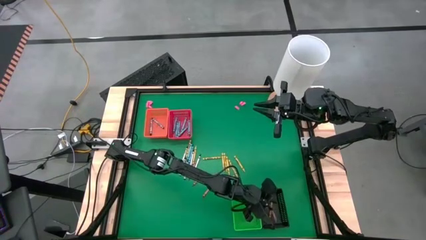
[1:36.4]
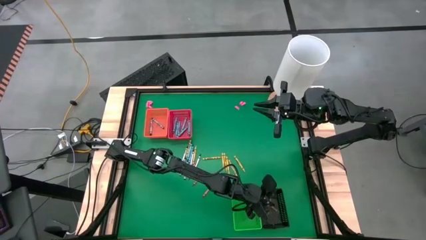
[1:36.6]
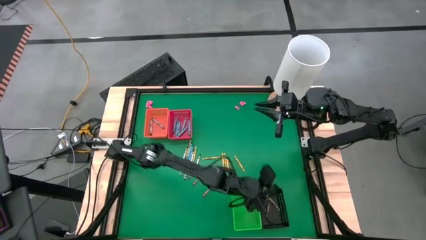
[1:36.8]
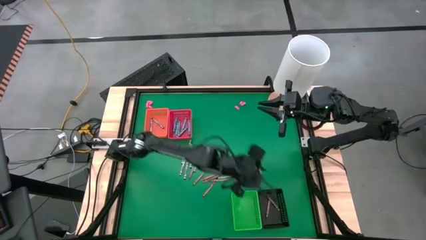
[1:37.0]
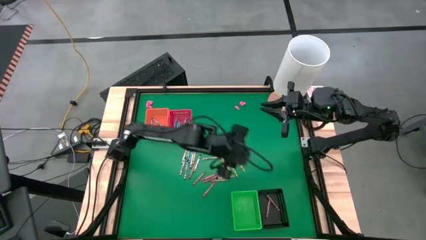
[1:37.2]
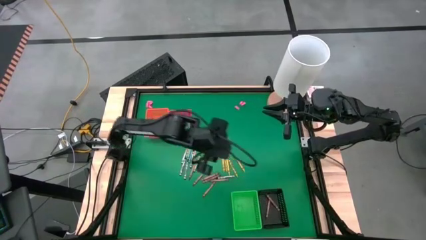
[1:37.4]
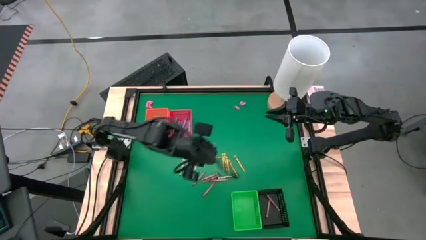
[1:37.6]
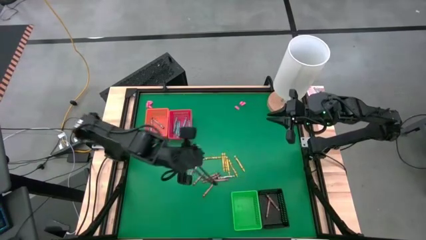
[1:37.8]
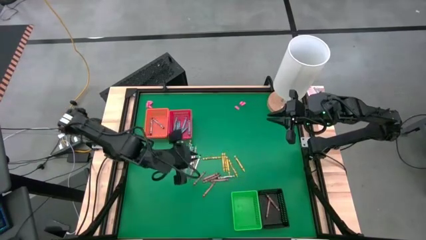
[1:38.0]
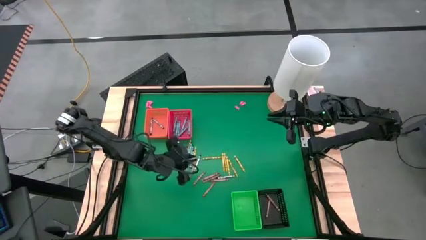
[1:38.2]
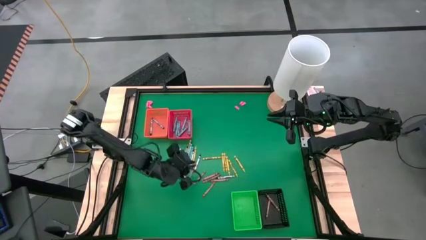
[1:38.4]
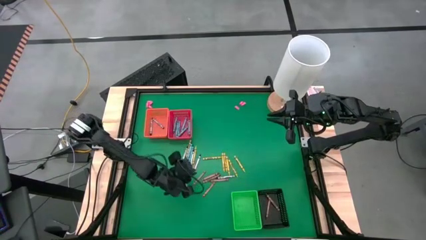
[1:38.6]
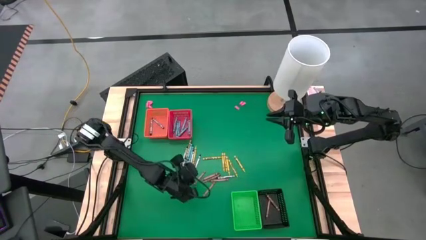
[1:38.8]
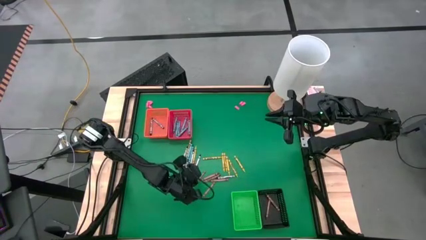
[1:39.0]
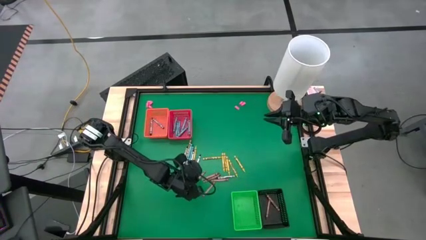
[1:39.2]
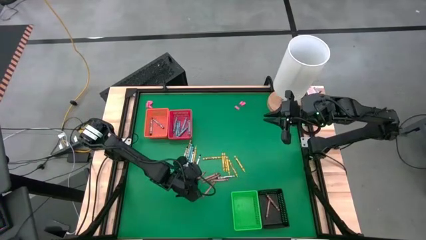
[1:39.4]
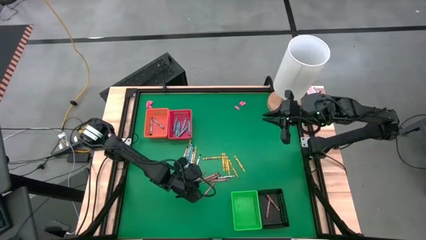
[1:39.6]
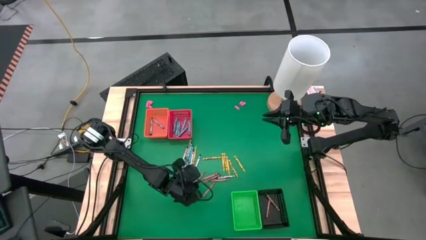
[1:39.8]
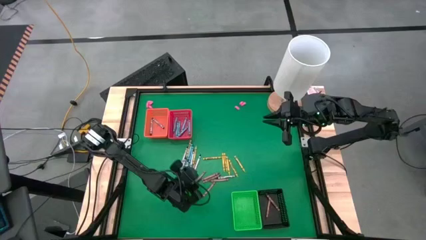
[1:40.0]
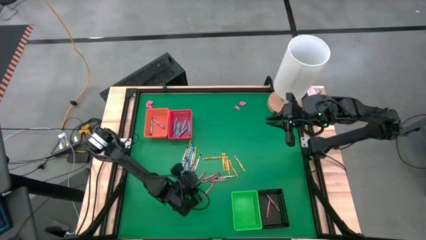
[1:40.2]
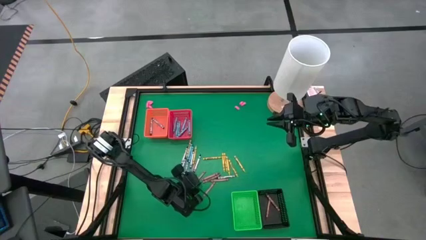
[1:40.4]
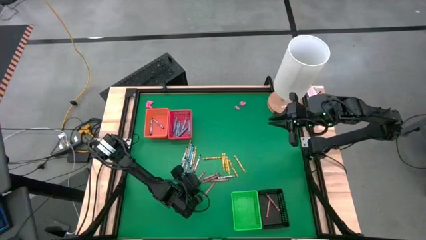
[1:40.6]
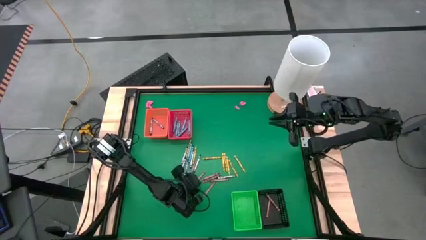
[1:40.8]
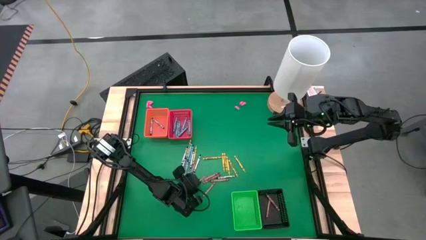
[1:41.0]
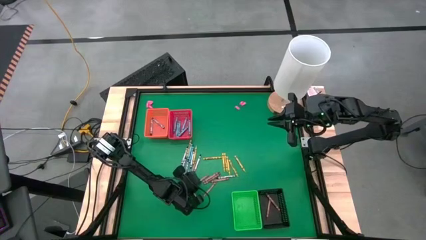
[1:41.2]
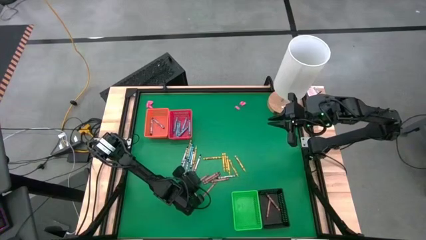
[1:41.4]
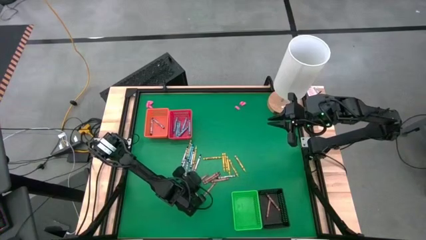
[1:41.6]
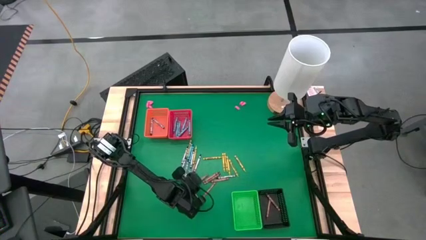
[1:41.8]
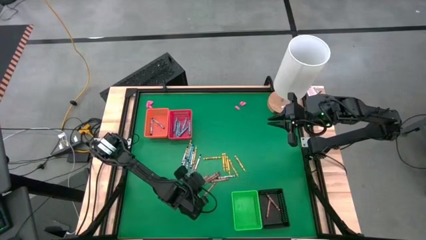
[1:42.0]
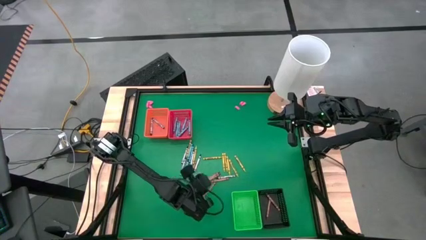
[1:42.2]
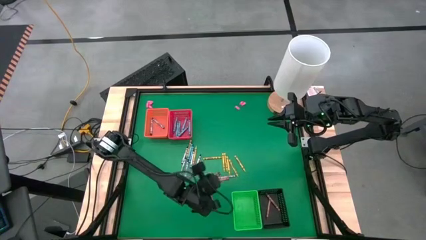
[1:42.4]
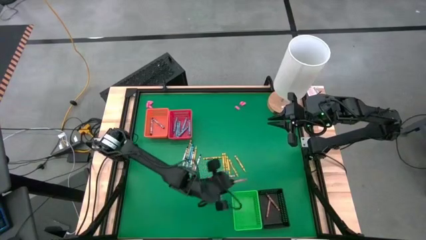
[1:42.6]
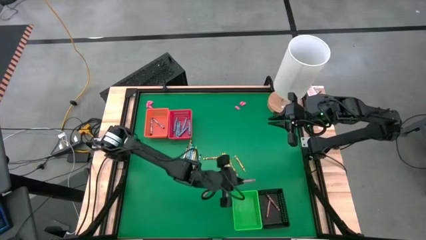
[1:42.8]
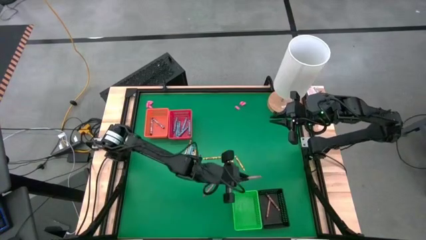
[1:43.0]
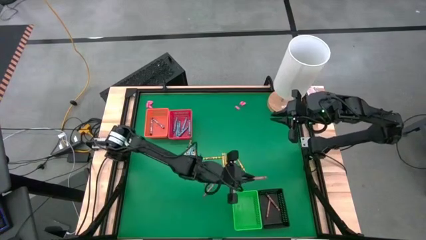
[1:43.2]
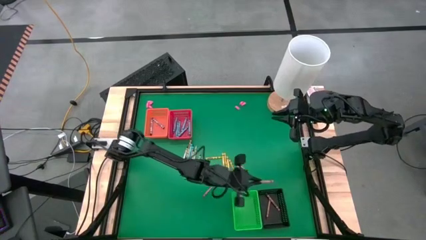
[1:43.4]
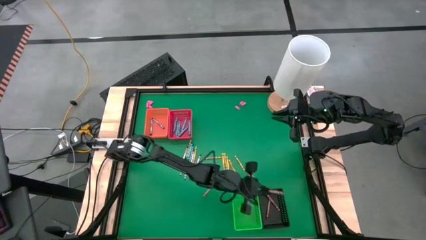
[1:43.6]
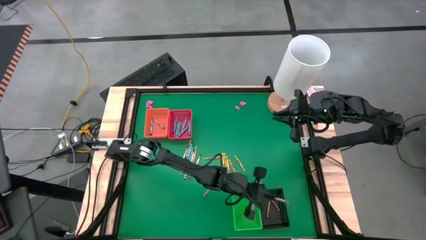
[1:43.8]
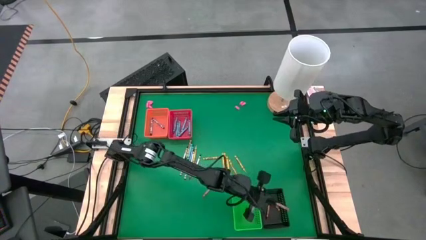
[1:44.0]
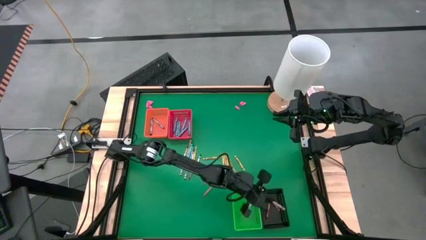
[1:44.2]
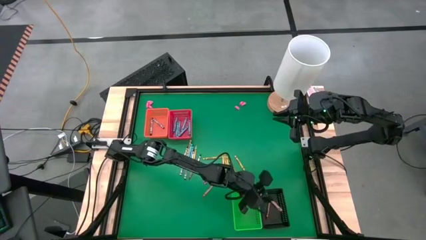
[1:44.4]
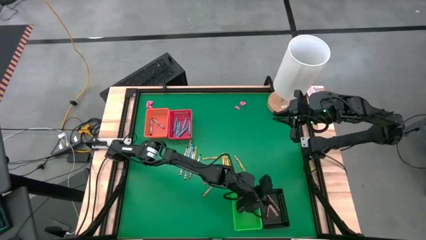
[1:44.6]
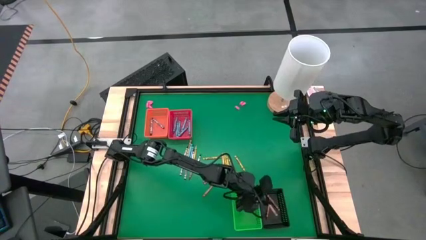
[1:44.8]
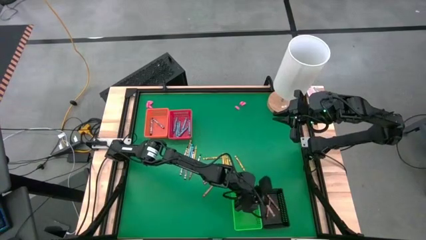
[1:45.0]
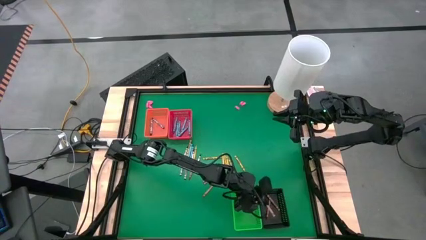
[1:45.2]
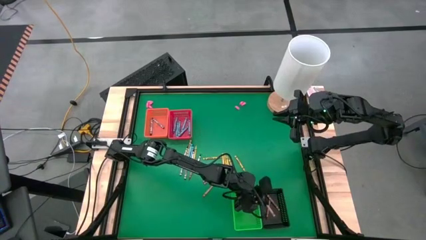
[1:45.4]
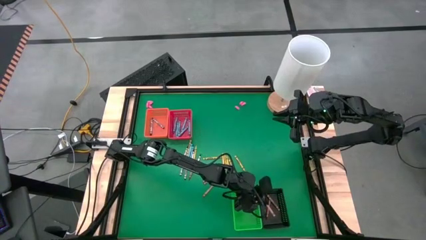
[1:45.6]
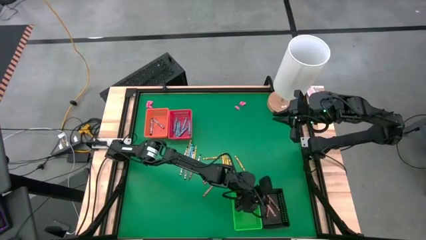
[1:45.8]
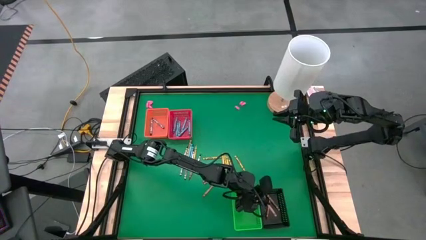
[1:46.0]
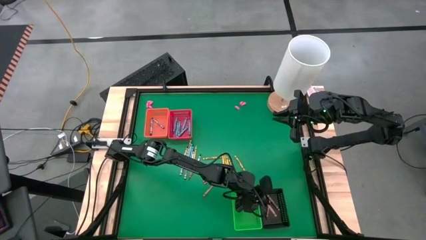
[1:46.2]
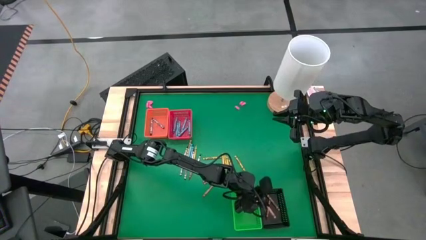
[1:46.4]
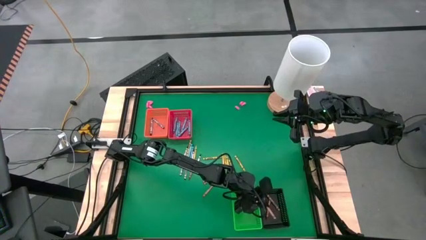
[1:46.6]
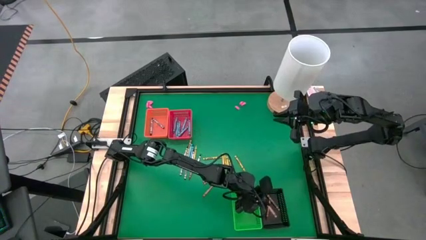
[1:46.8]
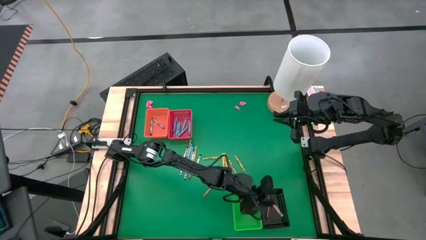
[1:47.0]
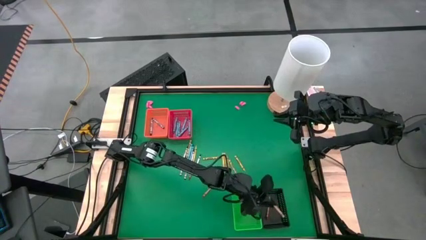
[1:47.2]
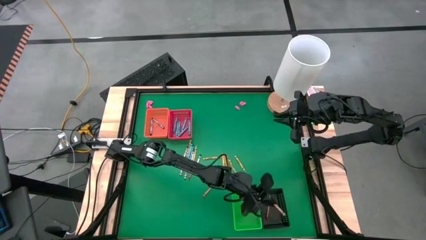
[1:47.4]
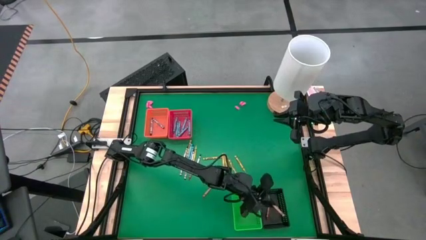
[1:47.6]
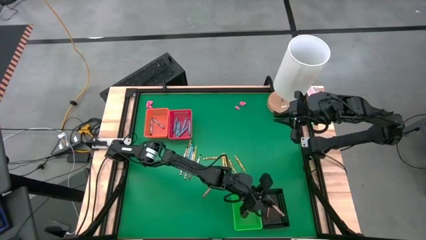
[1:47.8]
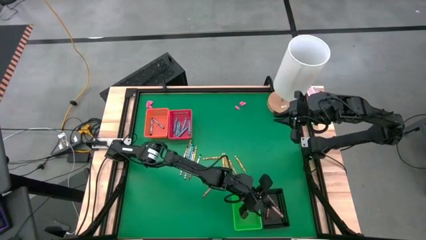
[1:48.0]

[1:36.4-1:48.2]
Task: Sort crayons
Put the brown crayon into the black bin

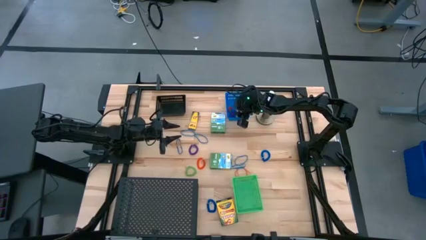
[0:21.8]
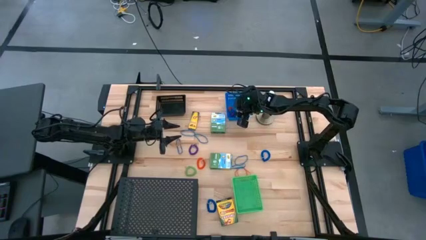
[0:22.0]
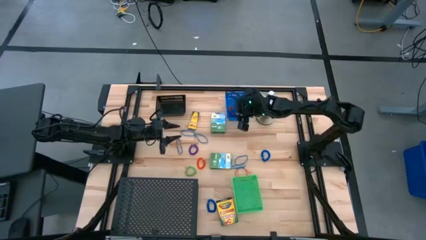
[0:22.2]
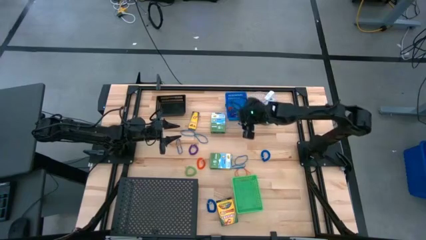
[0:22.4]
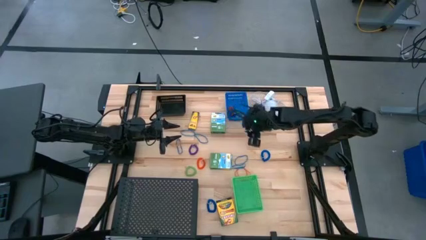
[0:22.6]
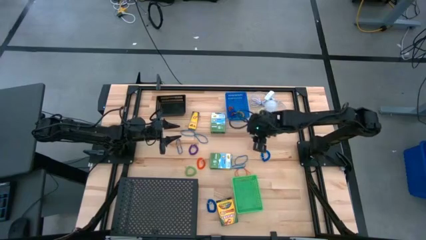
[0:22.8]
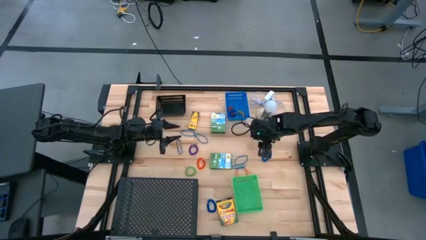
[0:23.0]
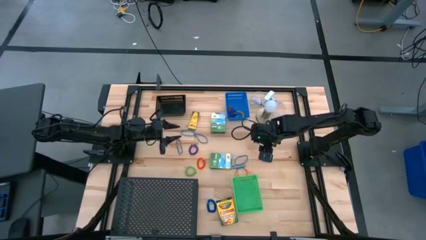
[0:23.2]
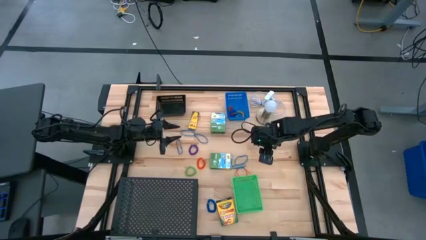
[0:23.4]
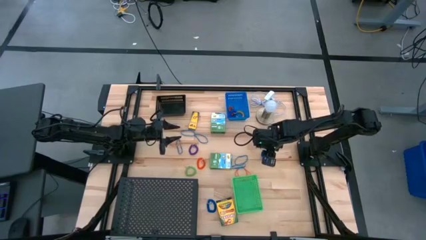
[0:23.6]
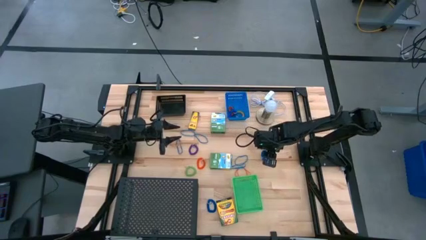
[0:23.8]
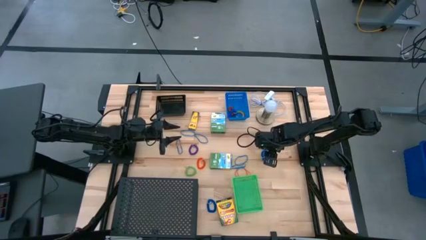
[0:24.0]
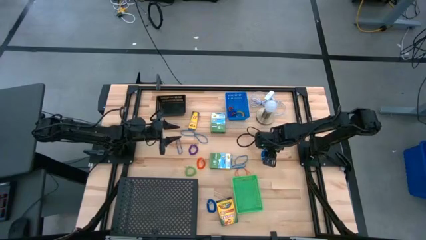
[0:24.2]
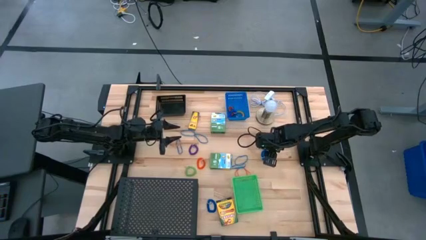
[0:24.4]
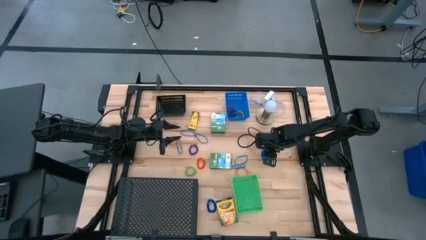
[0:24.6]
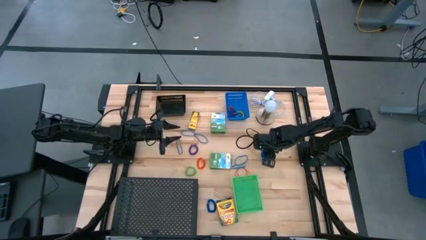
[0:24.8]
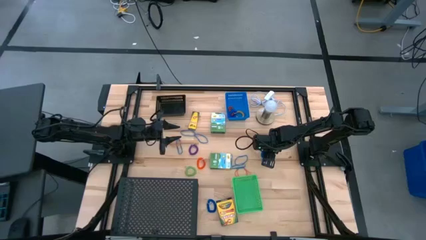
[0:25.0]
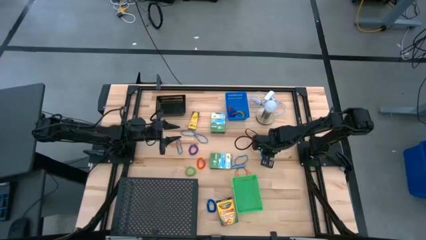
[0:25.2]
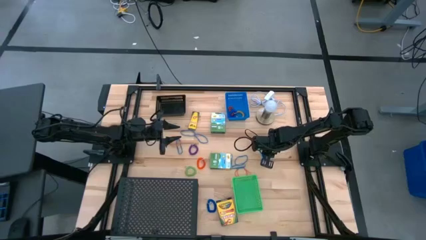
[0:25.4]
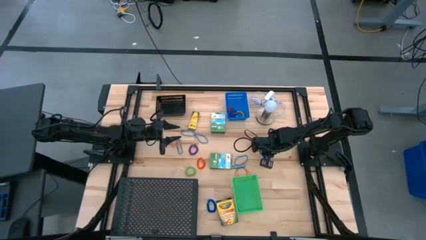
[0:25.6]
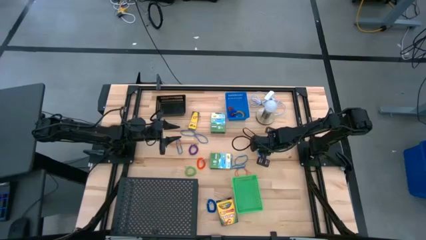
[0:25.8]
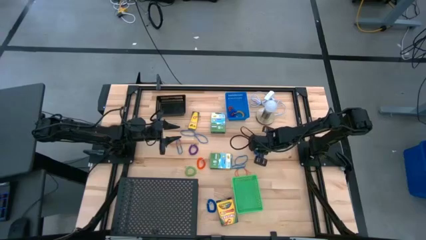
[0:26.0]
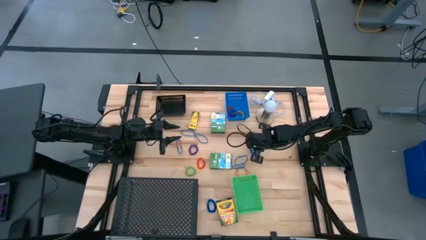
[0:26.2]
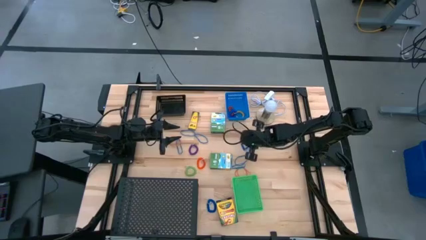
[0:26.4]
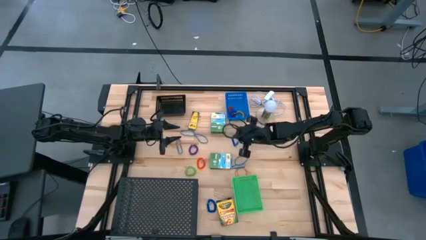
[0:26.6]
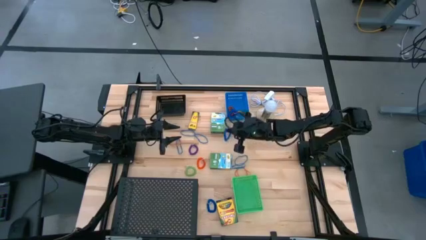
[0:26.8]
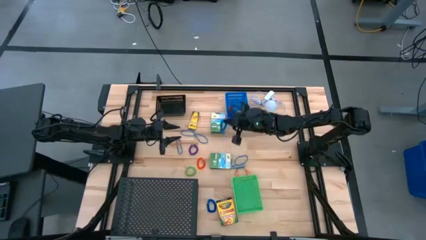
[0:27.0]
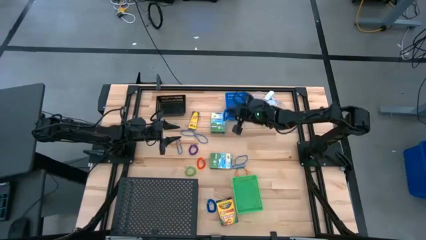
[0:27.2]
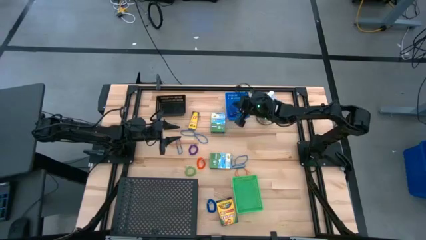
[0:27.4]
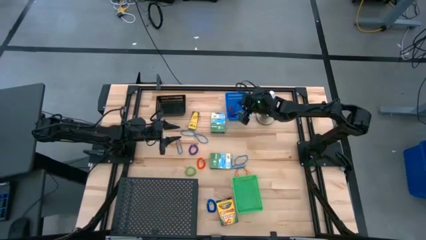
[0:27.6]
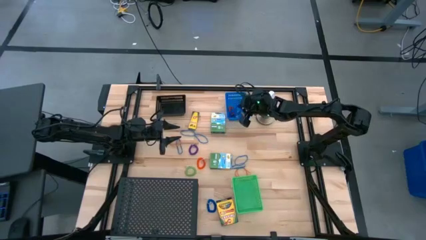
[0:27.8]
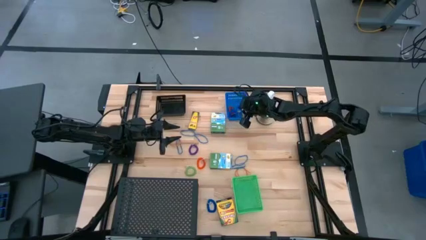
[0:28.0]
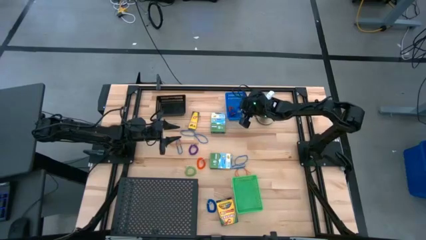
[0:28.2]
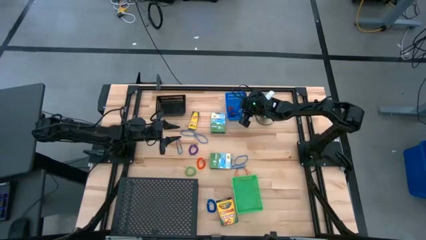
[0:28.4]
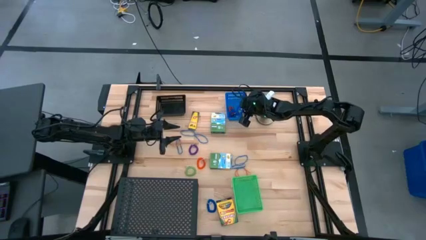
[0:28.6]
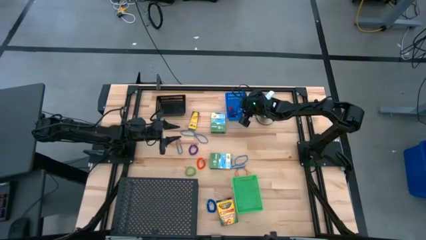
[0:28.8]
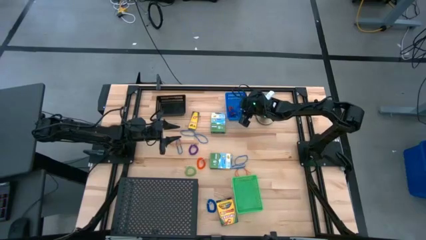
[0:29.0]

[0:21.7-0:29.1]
Task: Pick & Place Office Desk Supplies
Put the right blue spring keychain into the blue bin
